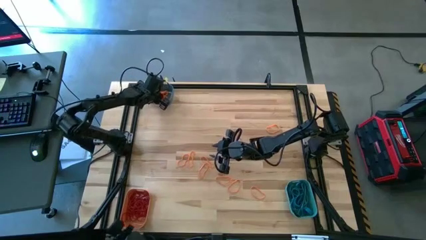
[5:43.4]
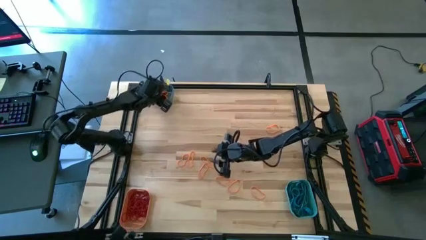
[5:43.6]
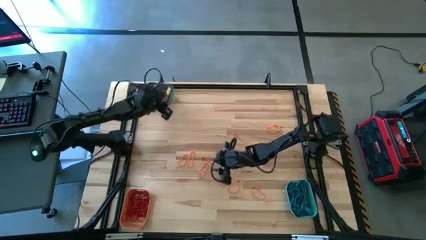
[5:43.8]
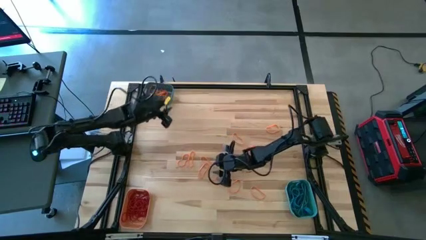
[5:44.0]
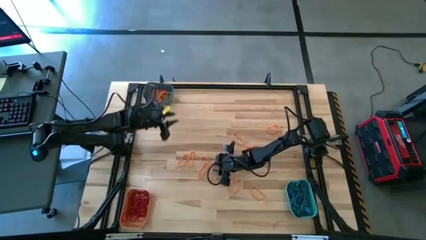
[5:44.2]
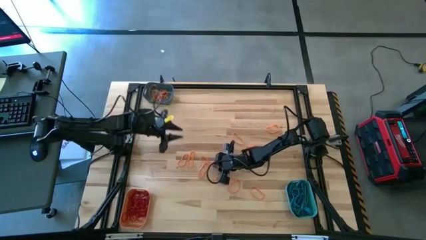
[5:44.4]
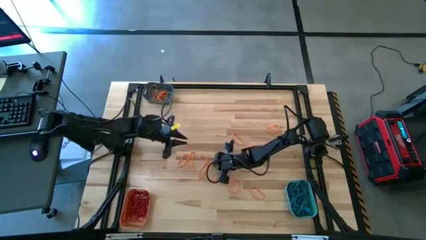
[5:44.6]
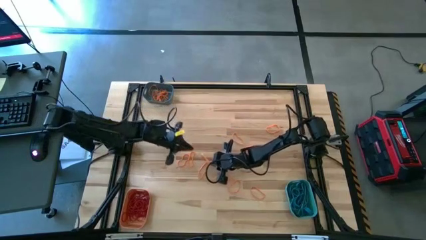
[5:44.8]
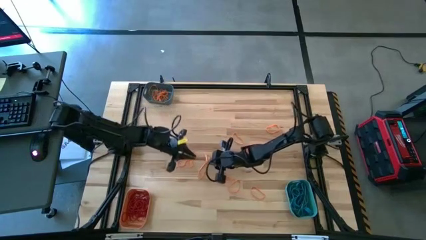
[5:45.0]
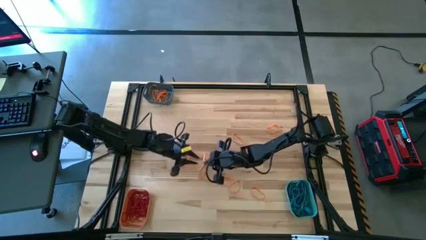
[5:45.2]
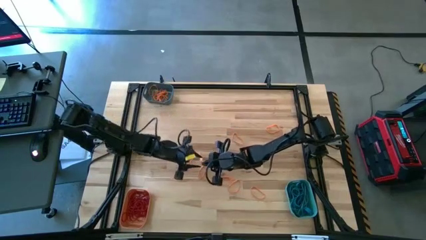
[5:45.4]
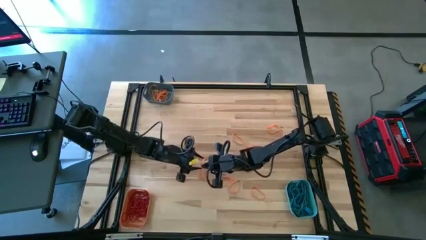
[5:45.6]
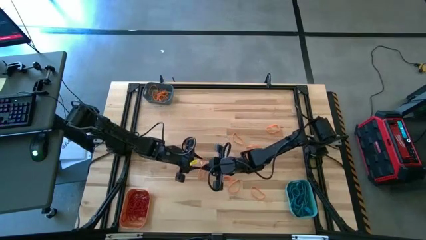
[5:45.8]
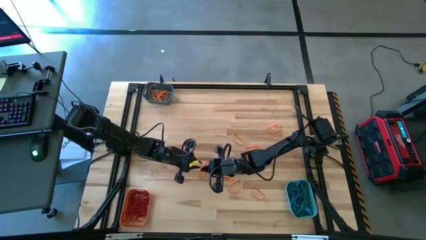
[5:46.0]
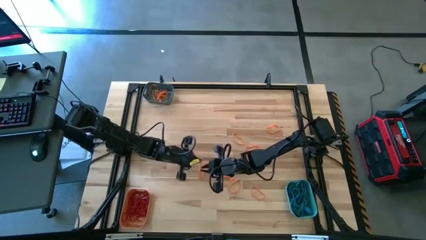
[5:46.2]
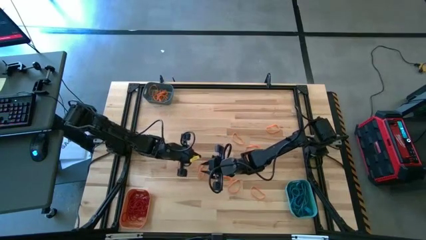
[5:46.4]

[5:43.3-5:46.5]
Task: Sort rubber bands into baskets
Put the orange rubber band into the blue bin

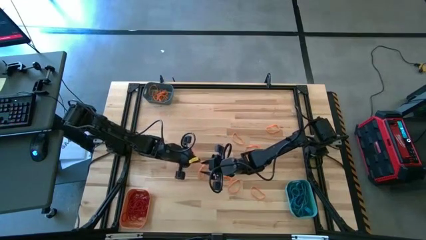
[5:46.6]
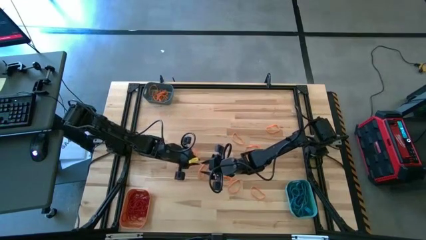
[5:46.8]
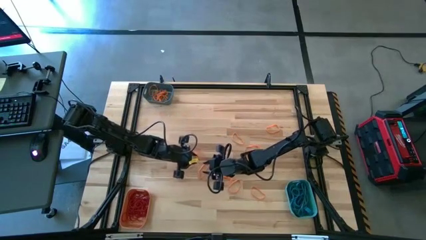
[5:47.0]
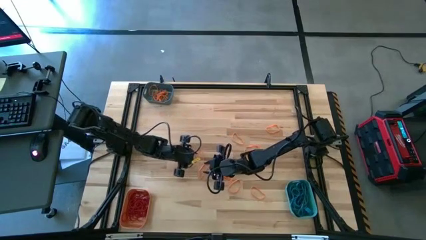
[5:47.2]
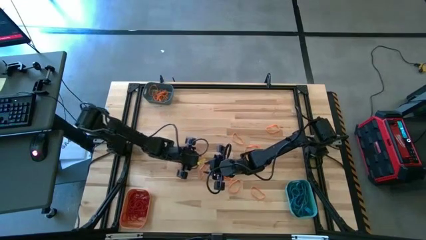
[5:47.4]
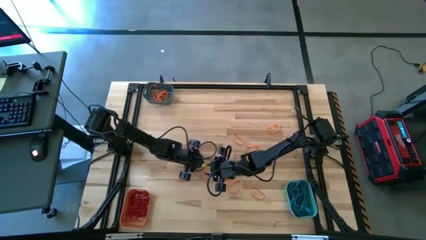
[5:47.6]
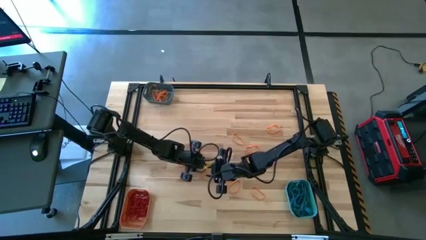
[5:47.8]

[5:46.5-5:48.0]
Put the orange rubber band into the blue bin

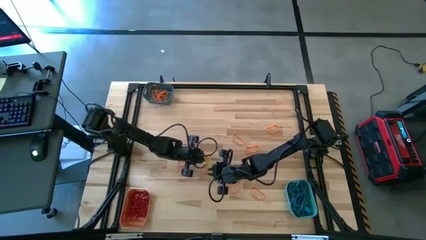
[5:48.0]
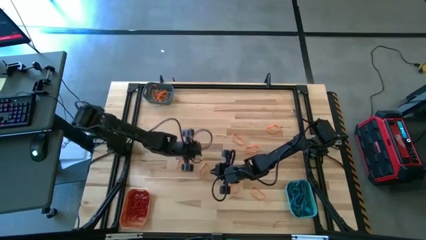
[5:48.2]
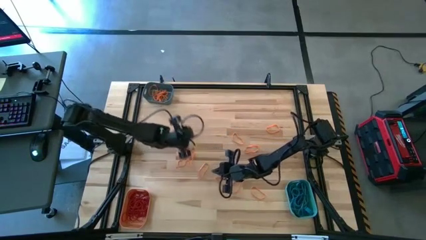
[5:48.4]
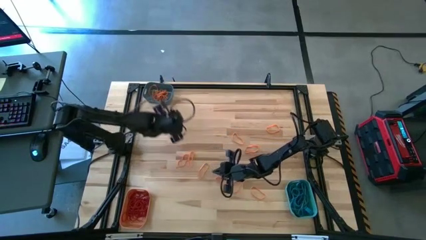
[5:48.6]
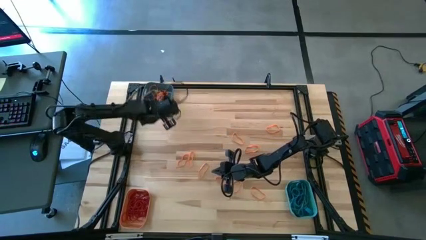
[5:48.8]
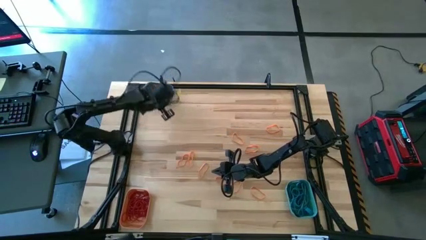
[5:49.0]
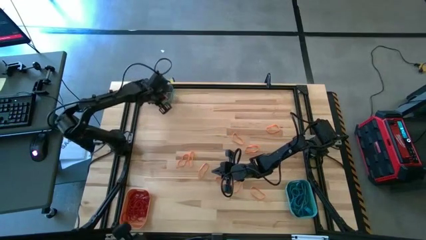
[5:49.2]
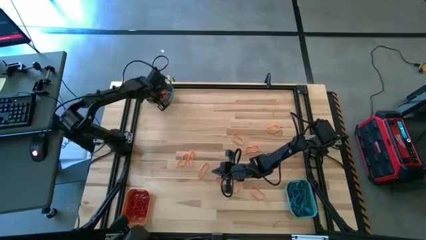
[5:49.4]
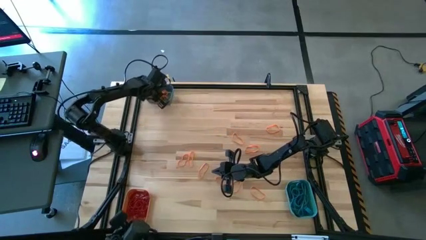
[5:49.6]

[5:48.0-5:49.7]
Put the orange rubber band into the blue bin

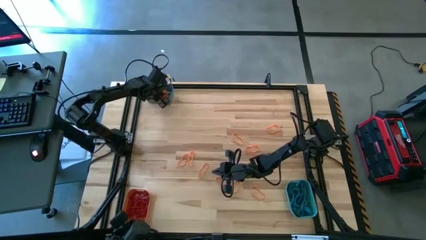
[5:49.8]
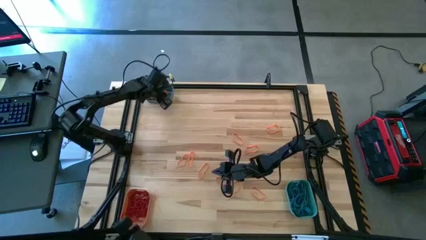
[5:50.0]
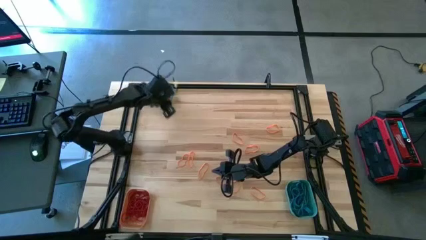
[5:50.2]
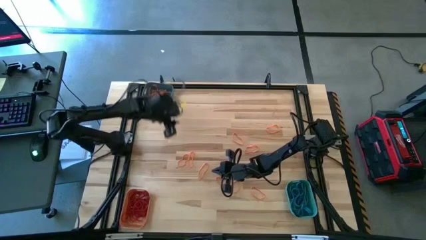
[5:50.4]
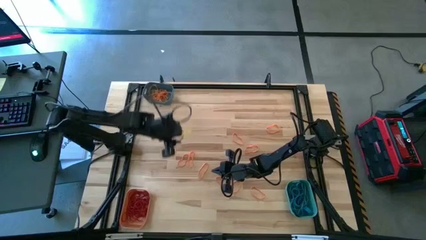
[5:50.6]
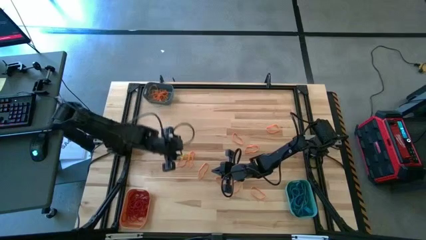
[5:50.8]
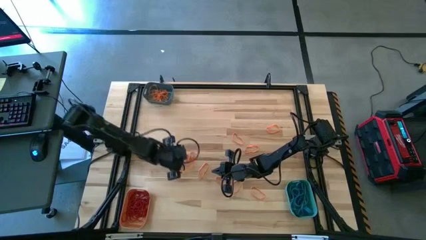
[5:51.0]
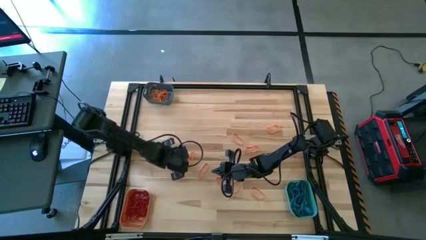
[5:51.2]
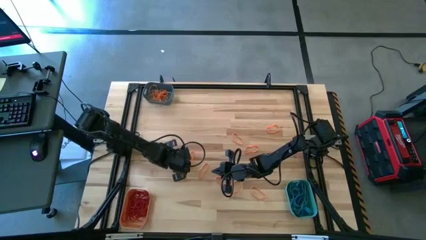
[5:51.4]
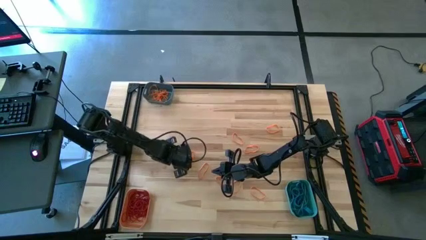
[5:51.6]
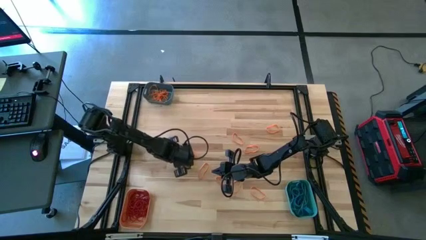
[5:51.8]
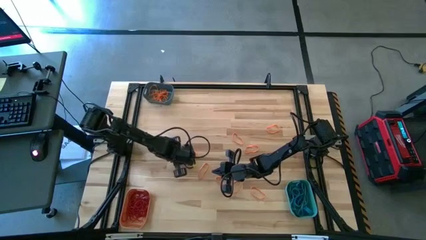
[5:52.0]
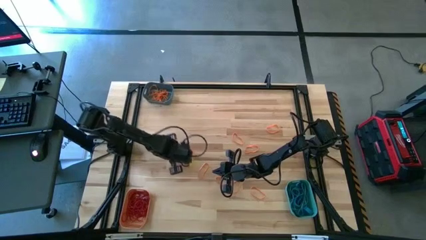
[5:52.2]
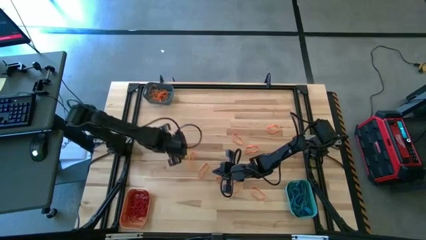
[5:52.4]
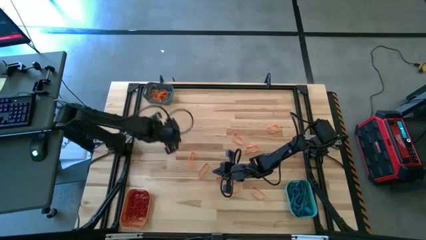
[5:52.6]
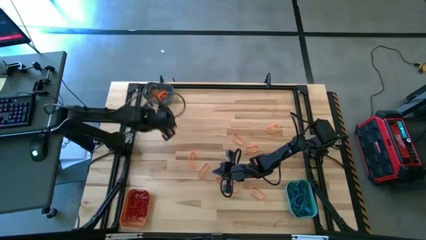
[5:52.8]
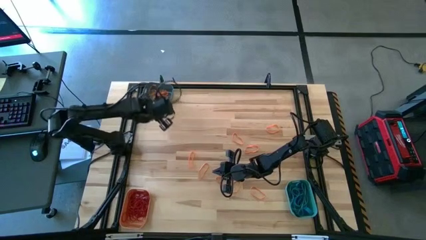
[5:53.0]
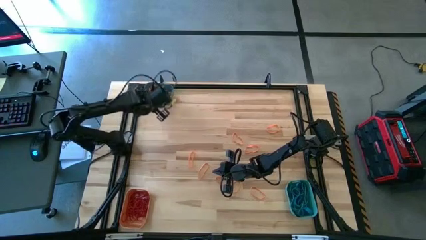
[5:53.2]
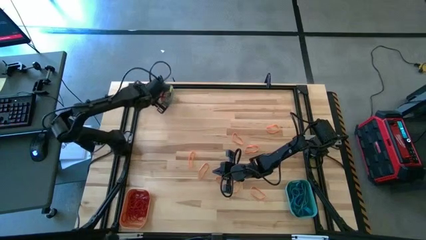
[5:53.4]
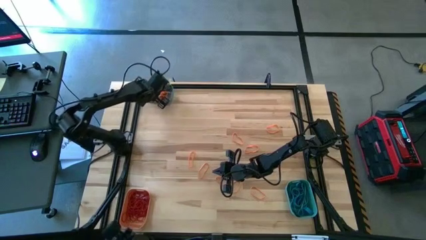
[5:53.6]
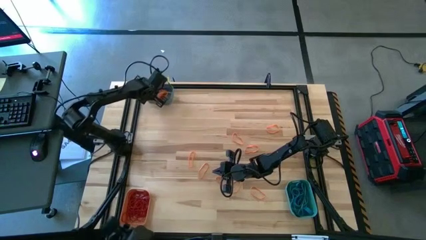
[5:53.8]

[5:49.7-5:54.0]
Put the orange rubber band into the blue bin

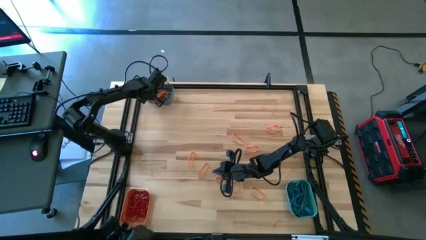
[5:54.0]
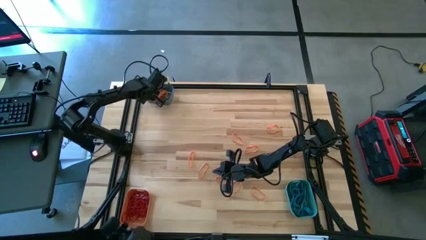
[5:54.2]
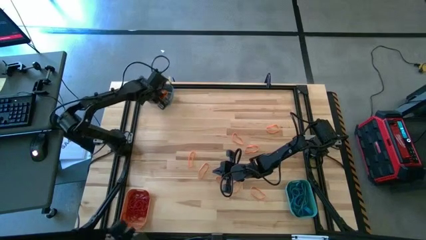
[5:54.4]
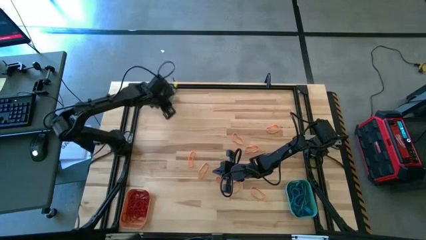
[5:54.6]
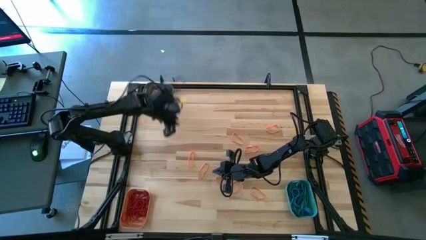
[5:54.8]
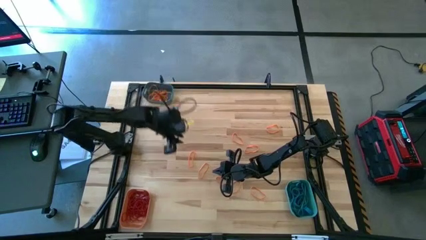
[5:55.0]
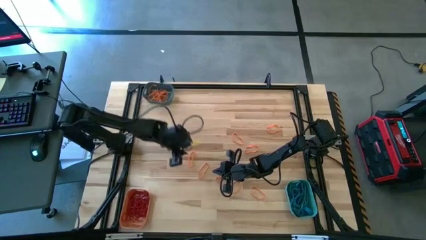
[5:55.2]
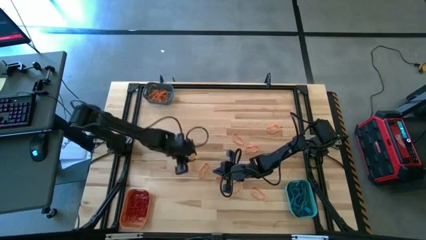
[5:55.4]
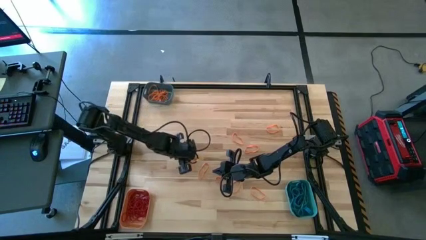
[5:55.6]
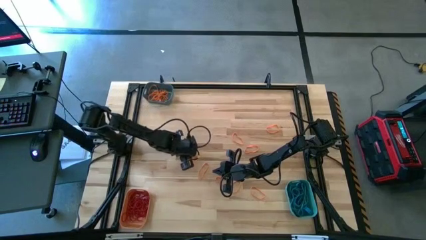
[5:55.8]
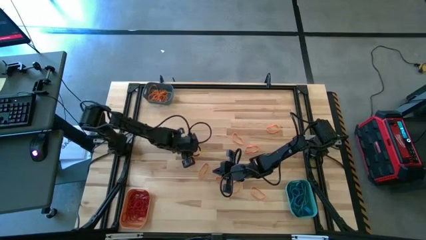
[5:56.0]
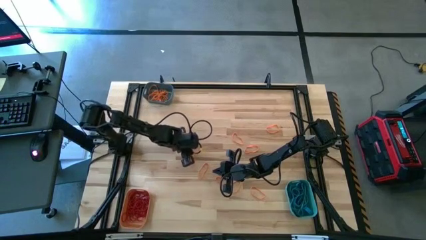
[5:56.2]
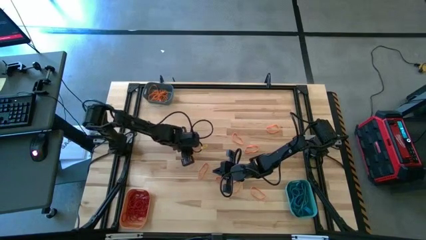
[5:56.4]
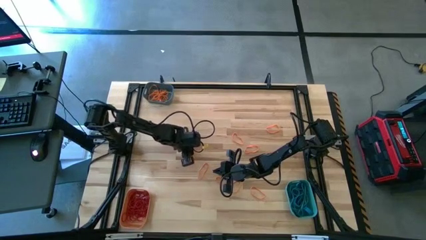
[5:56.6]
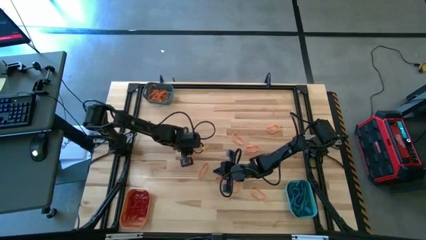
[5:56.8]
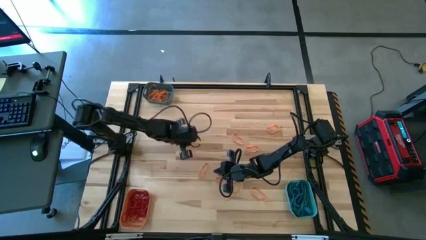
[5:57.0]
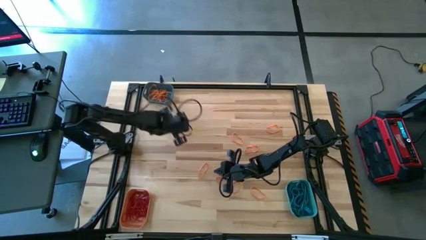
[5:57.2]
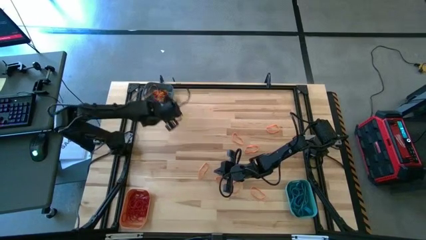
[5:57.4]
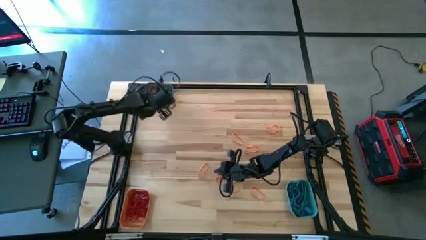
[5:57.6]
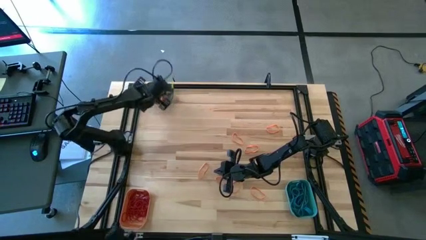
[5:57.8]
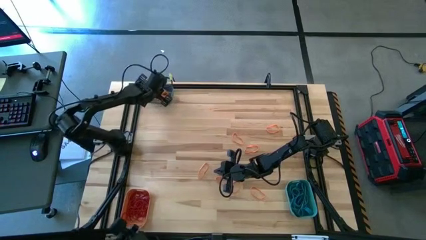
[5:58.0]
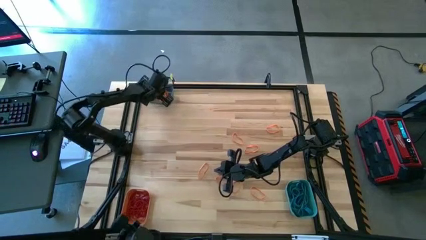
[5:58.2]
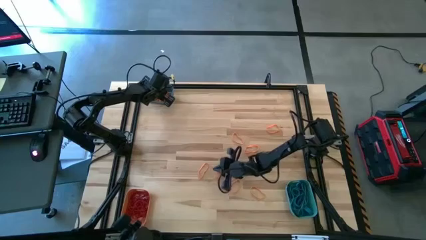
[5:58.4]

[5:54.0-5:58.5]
Put the orange rubber band into the blue bin

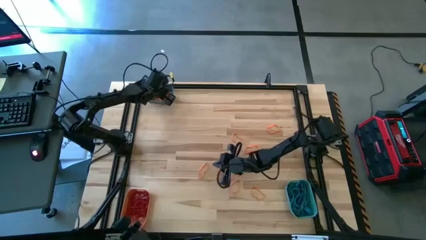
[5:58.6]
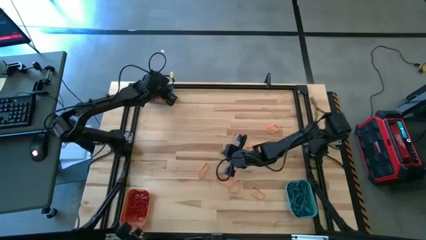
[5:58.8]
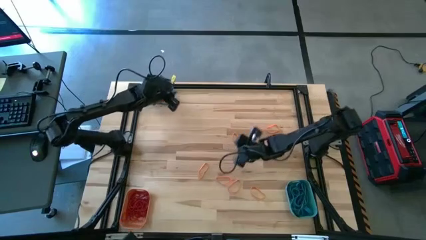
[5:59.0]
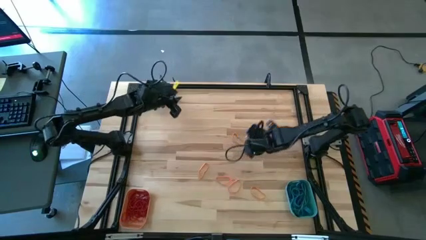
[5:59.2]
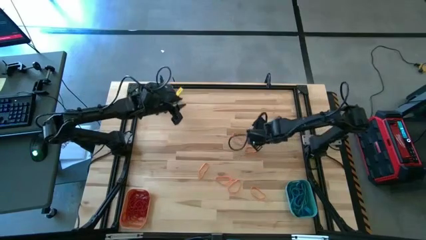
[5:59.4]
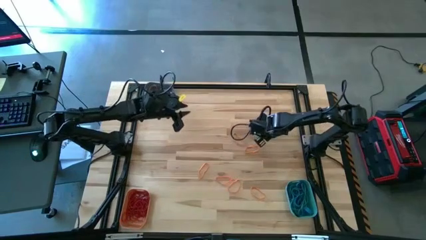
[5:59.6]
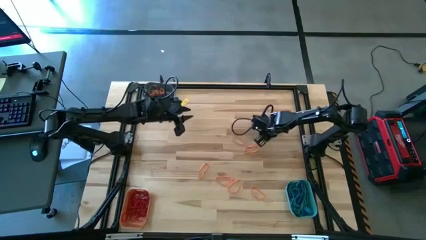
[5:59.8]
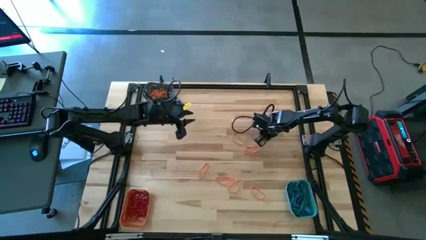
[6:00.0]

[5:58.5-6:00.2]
Put the orange rubber band into the blue bin

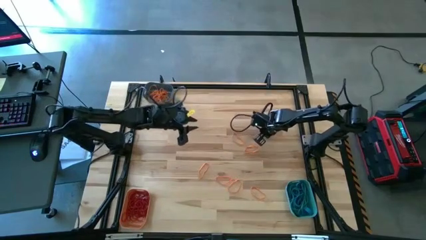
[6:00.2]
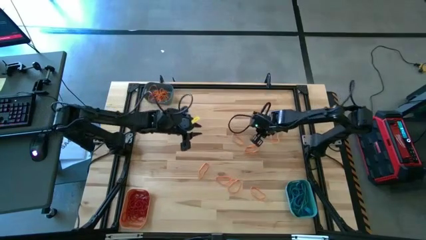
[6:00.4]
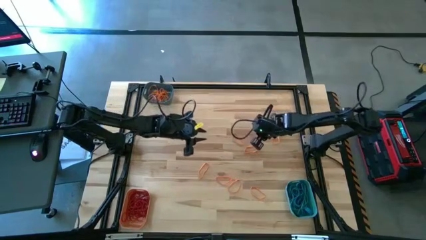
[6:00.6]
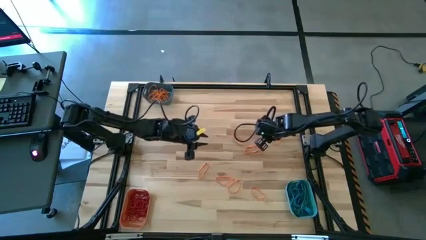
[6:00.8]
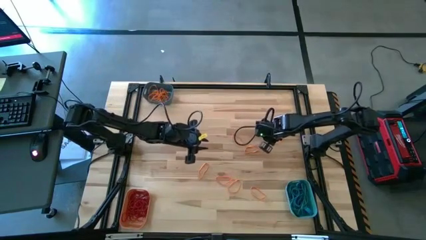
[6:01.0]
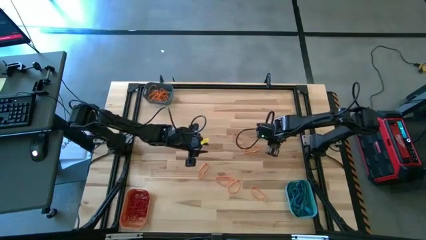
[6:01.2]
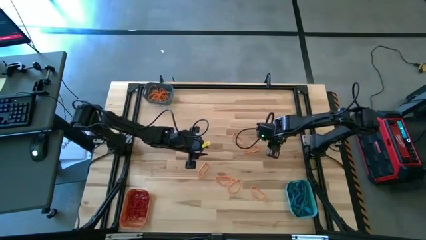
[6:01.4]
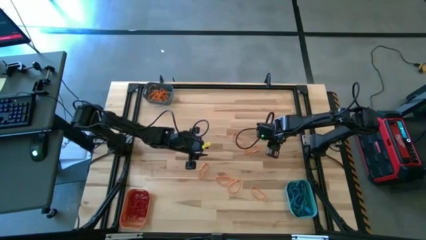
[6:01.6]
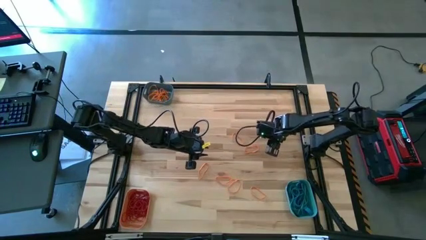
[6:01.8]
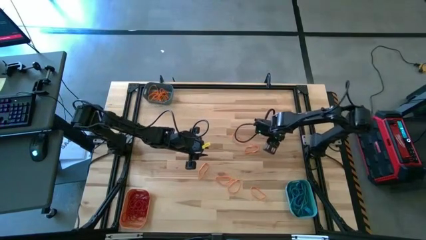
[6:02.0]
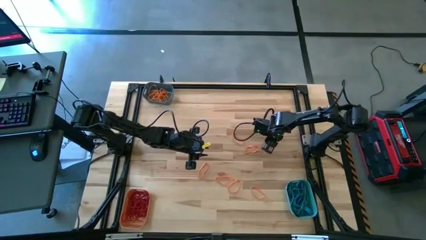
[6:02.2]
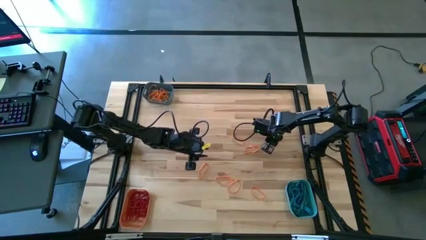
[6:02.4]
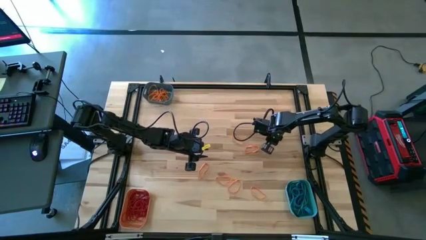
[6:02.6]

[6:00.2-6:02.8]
Put the orange rubber band into the blue bin
